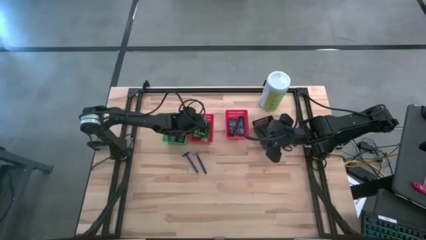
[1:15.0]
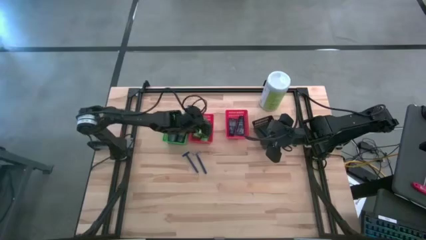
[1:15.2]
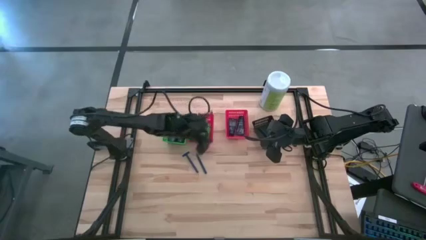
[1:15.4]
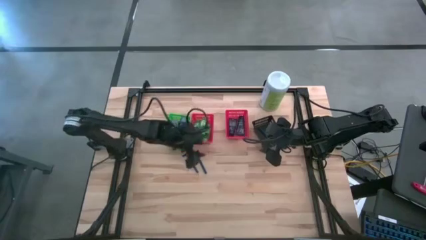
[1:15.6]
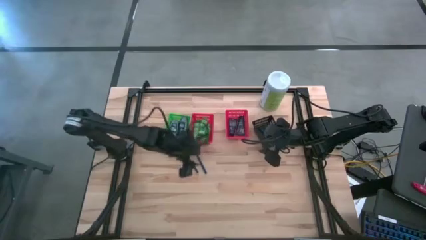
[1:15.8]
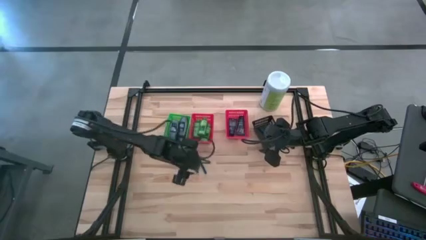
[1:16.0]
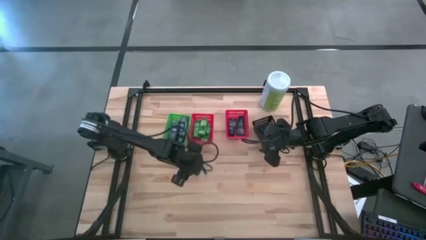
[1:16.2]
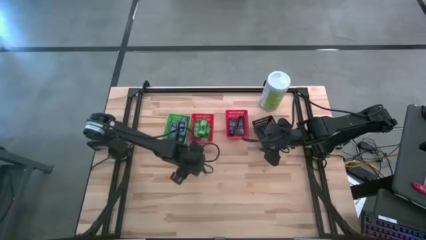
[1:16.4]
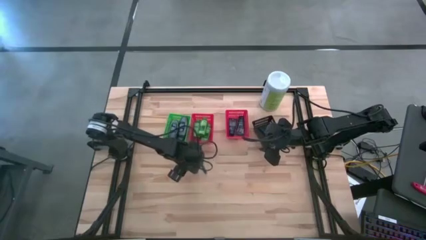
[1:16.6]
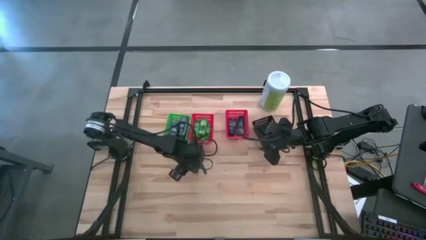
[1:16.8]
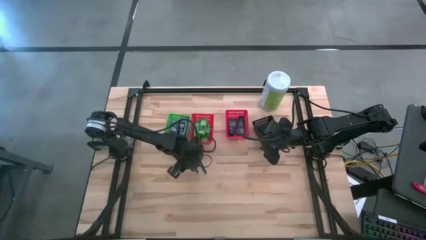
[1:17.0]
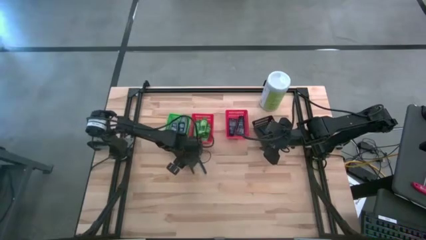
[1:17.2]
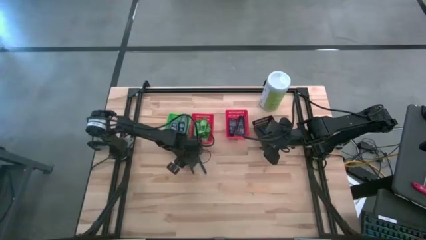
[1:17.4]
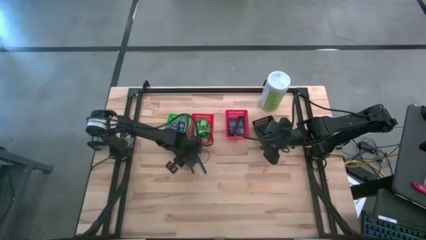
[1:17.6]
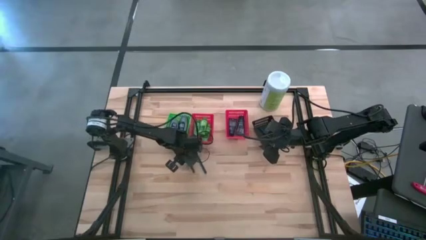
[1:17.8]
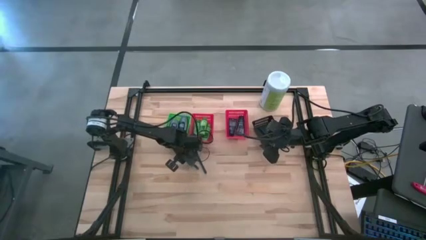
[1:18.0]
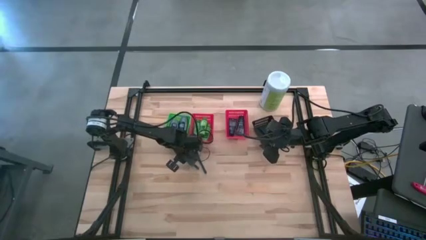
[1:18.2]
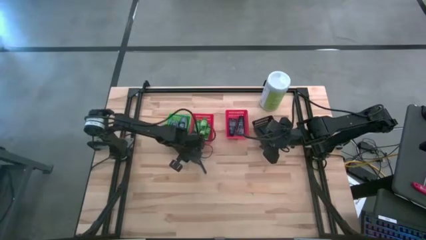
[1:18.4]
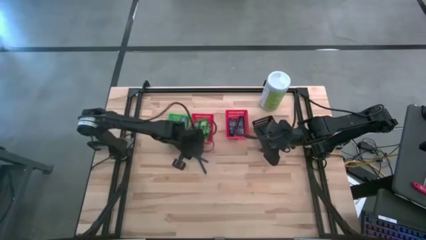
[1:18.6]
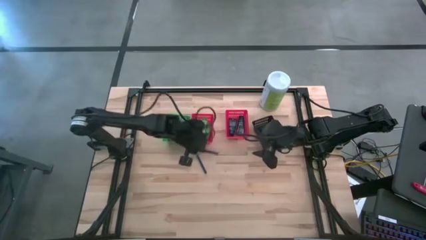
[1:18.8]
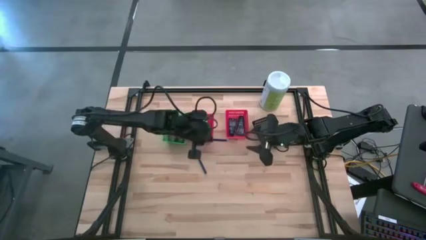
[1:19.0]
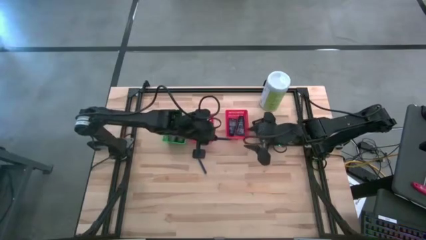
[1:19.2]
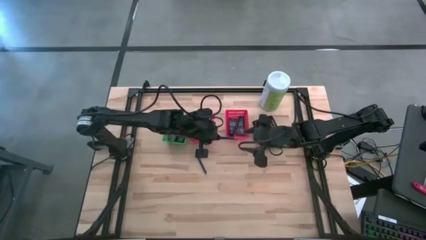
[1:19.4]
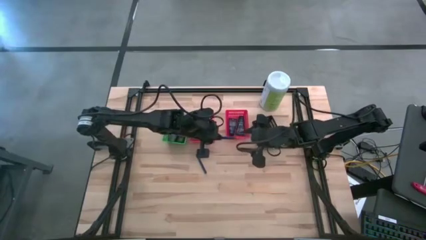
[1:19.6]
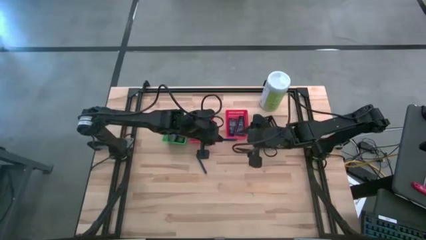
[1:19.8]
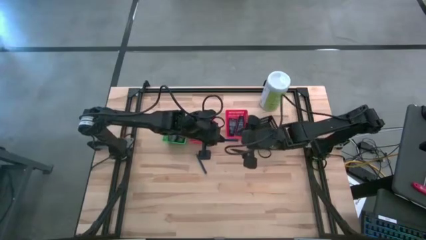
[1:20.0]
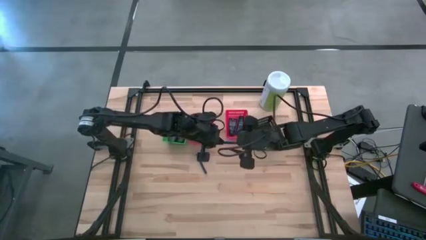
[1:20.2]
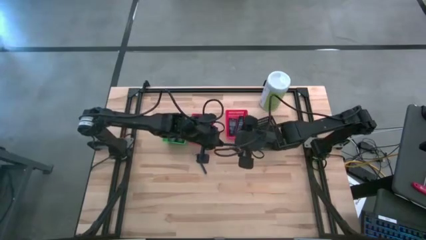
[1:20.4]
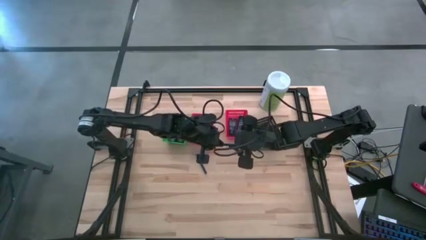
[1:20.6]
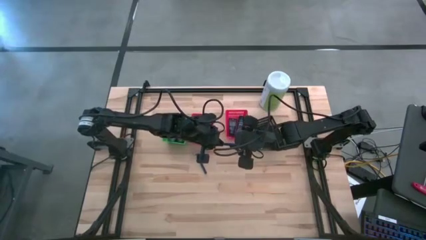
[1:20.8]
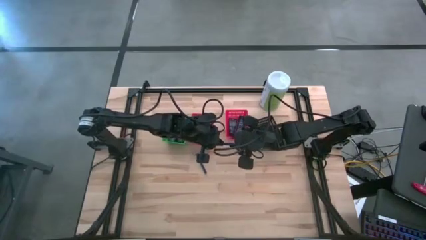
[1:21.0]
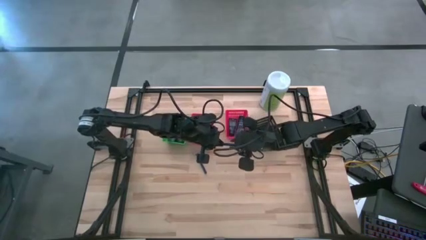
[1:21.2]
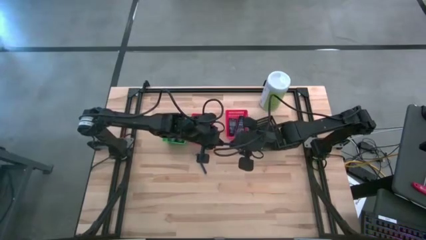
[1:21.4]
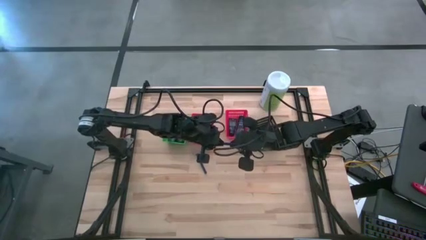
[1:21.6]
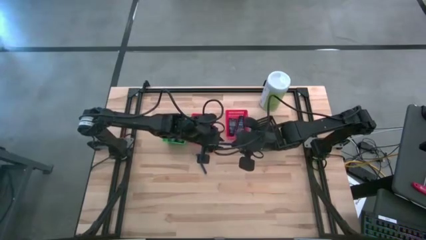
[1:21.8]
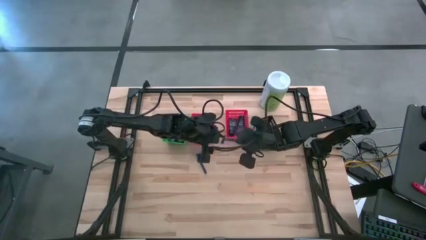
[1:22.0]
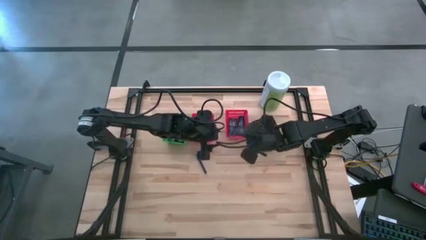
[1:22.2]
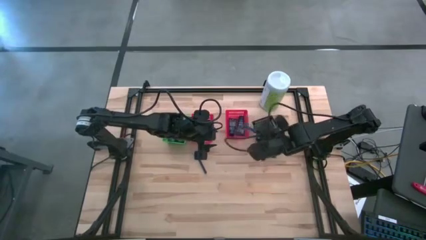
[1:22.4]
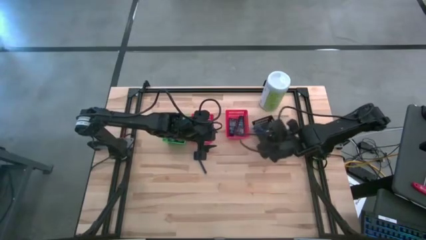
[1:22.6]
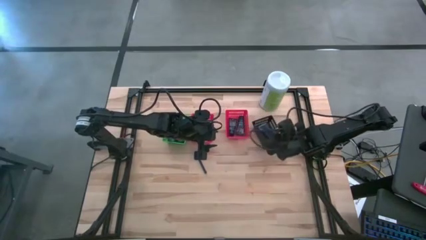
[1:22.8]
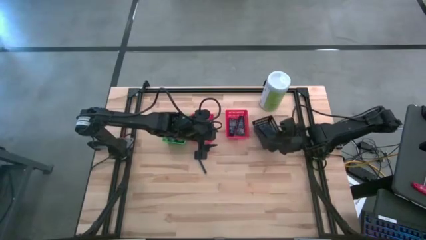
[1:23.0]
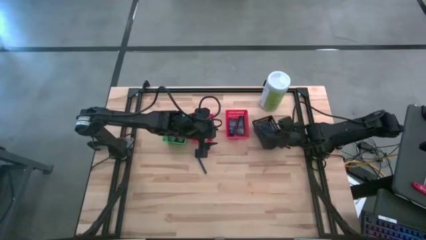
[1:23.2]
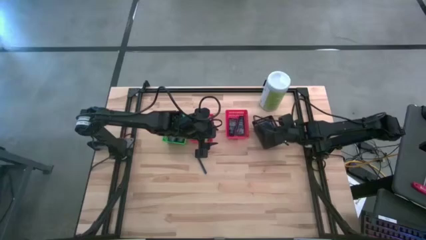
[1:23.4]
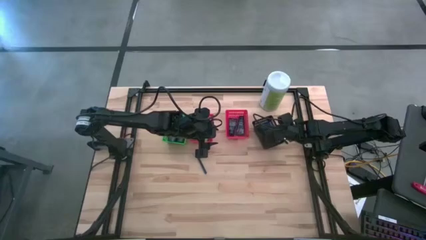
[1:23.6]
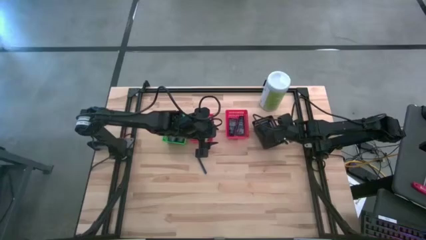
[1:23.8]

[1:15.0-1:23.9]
Task: Pick & Place Travel size toiletries
Put the blue shaver into the black bin

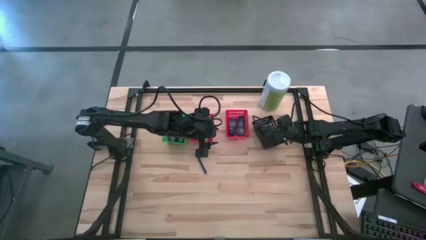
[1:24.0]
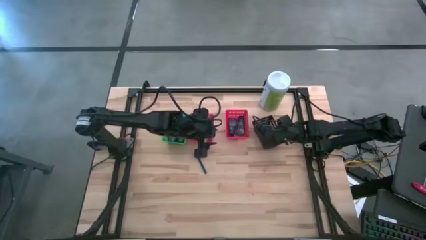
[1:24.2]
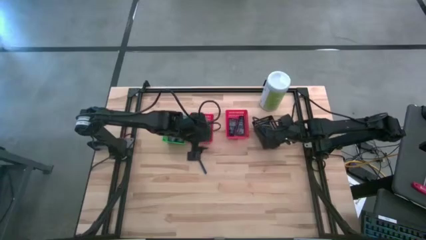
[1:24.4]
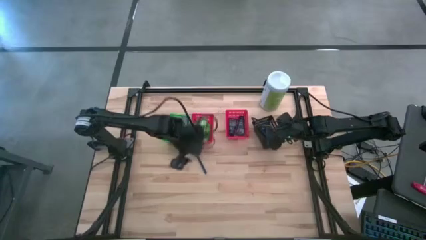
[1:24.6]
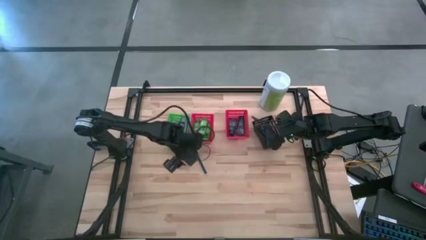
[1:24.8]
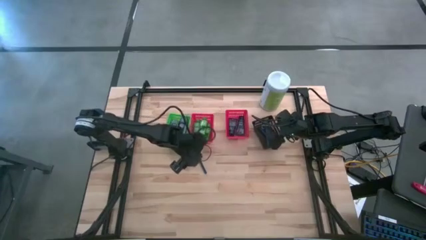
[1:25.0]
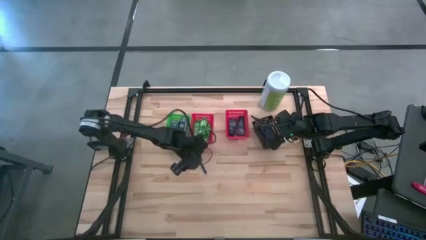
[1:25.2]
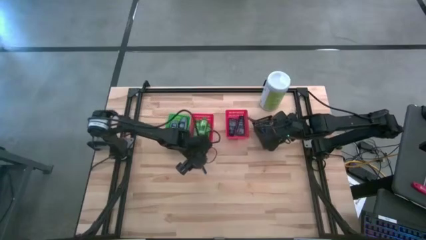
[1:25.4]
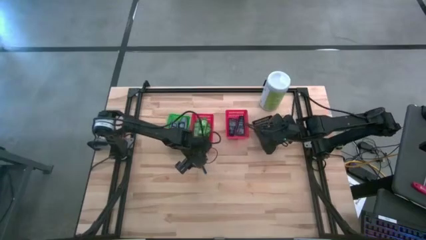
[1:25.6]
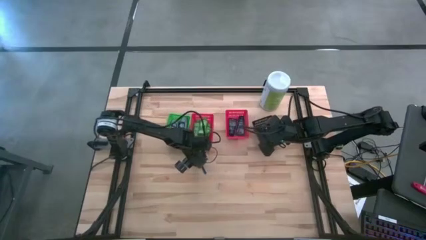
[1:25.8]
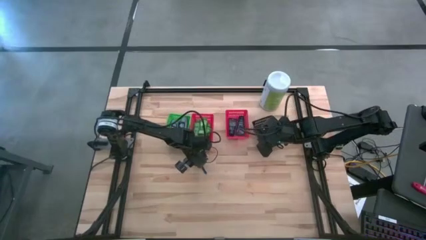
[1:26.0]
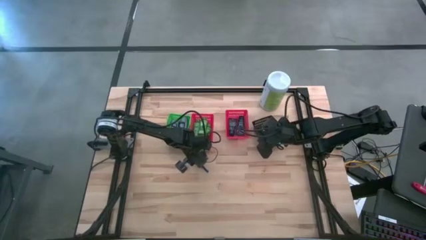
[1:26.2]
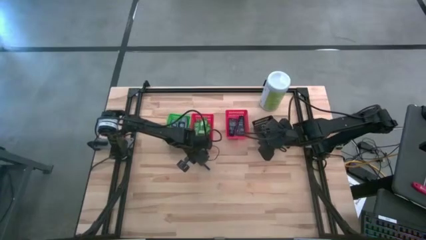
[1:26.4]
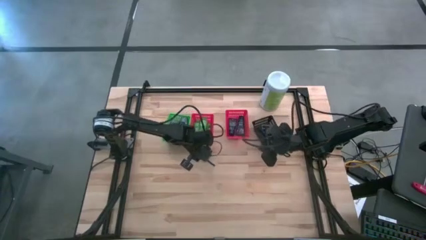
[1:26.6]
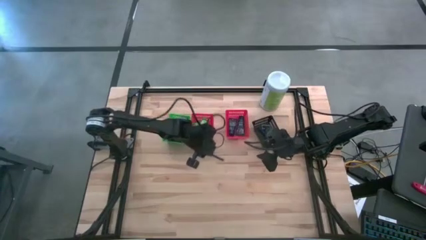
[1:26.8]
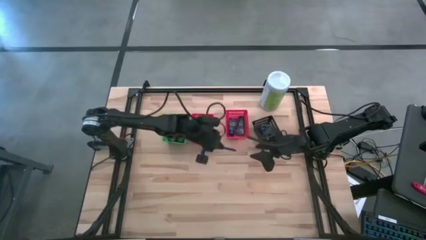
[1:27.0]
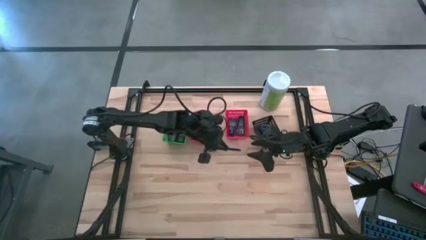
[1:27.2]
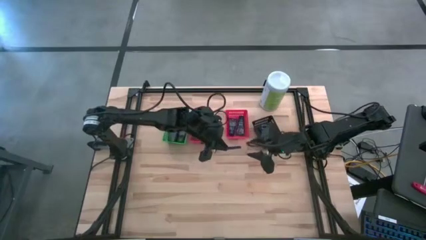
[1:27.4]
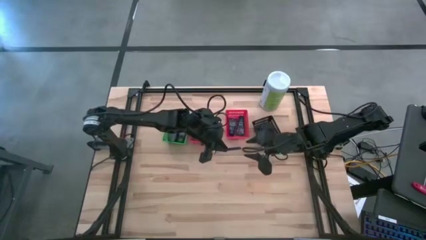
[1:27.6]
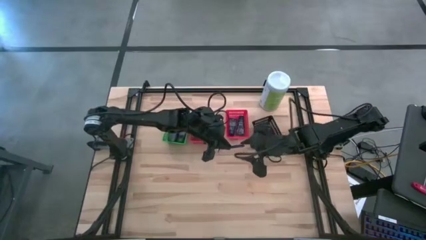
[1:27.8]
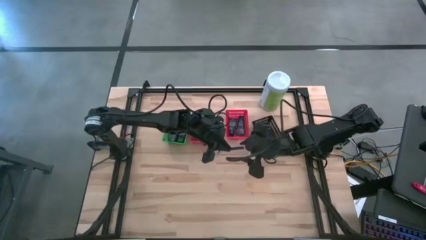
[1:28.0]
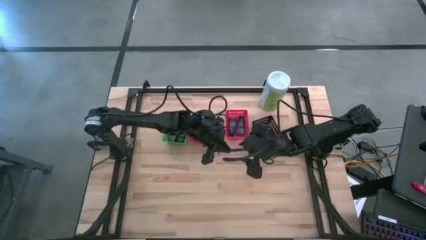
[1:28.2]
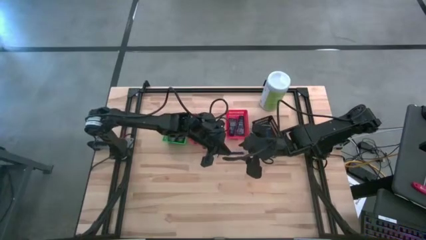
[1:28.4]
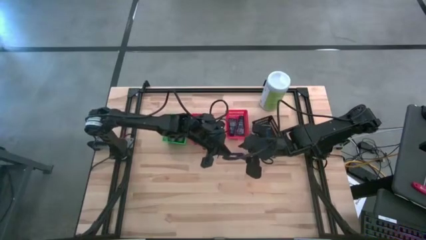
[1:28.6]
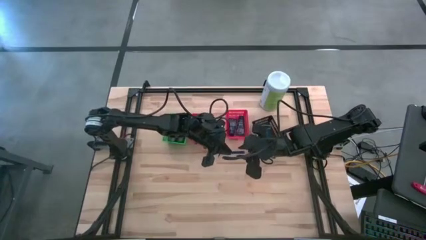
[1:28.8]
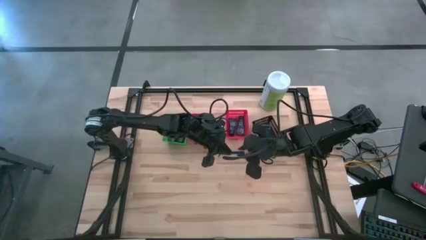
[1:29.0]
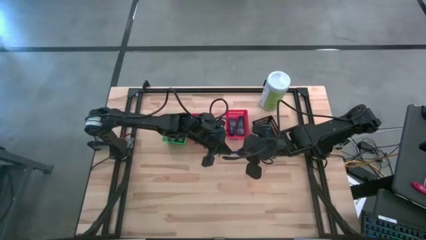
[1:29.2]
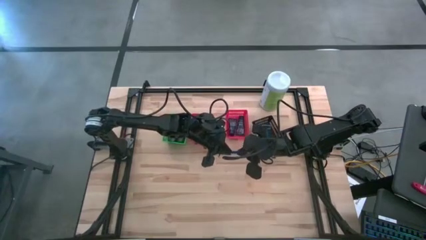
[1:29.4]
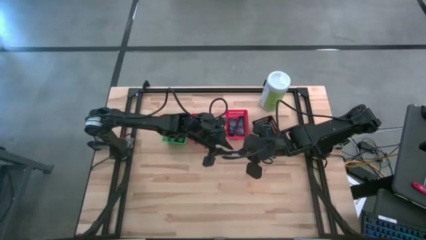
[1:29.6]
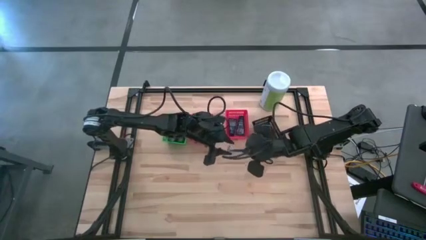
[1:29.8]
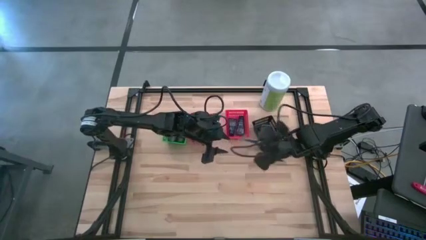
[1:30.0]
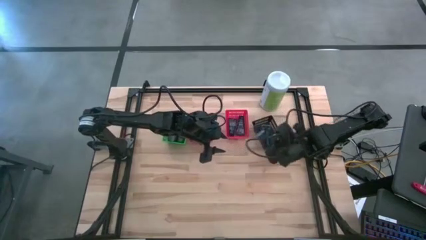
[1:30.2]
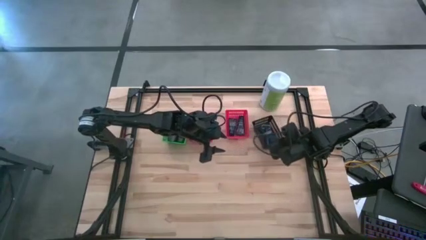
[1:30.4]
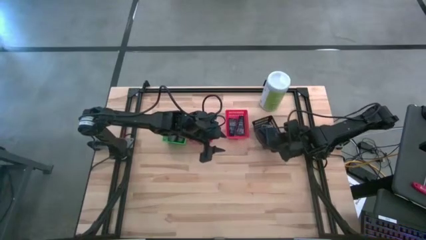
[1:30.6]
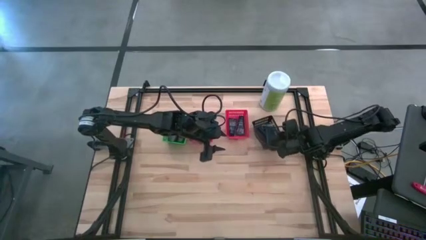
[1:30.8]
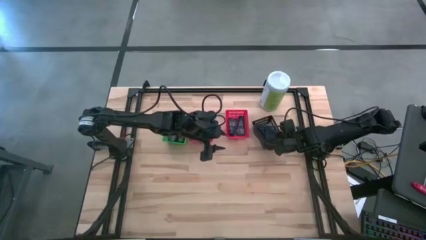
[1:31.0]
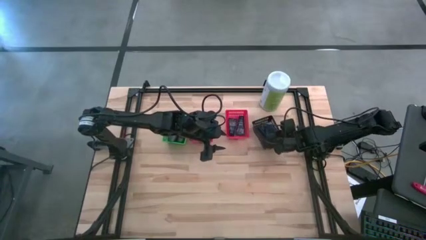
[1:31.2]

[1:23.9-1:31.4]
Put the blue shaver into the black bin
